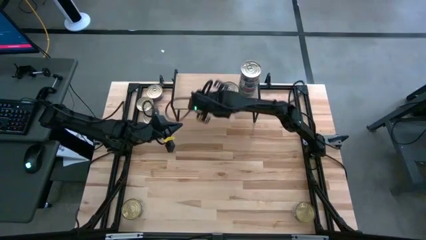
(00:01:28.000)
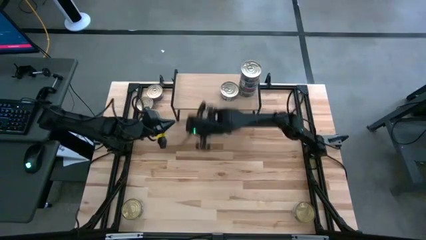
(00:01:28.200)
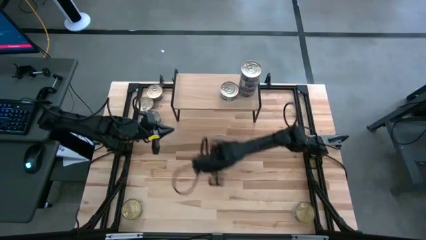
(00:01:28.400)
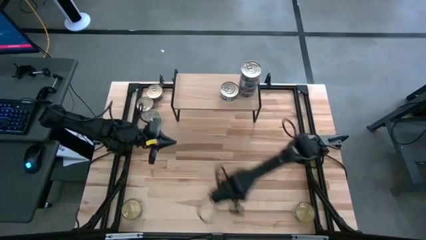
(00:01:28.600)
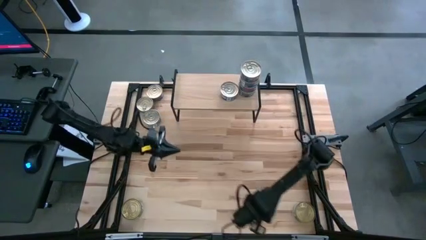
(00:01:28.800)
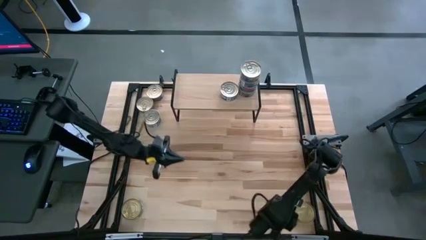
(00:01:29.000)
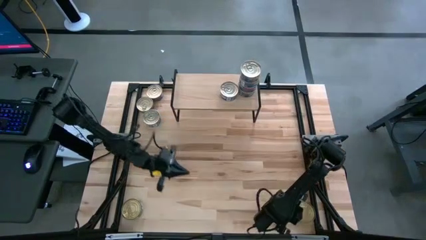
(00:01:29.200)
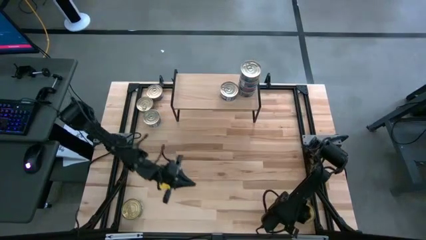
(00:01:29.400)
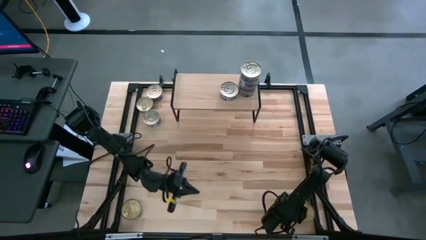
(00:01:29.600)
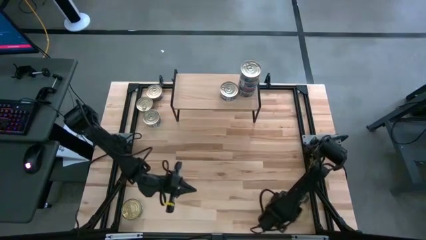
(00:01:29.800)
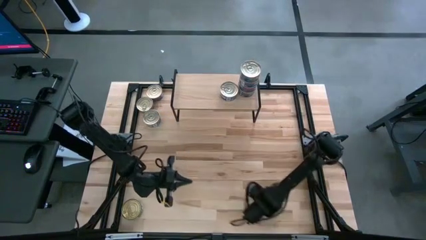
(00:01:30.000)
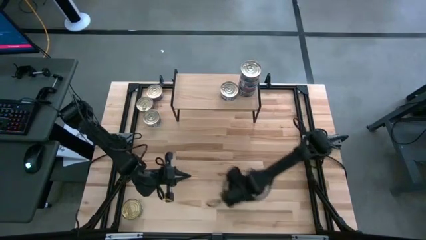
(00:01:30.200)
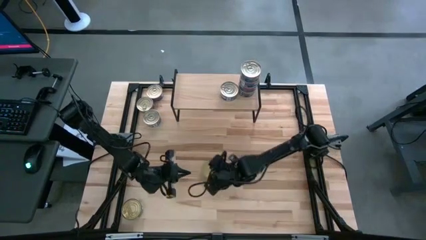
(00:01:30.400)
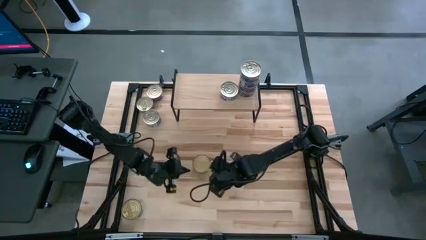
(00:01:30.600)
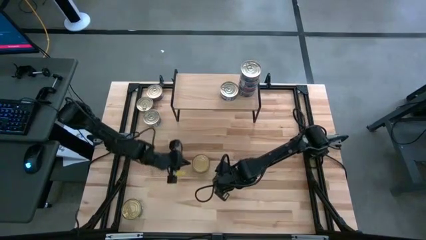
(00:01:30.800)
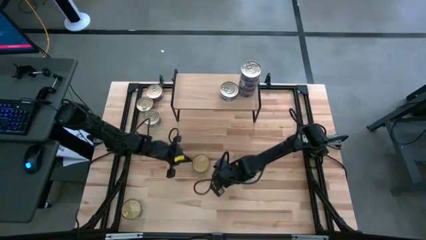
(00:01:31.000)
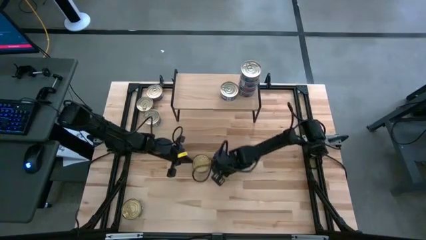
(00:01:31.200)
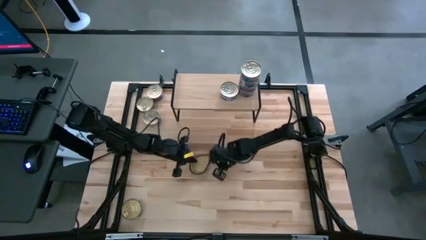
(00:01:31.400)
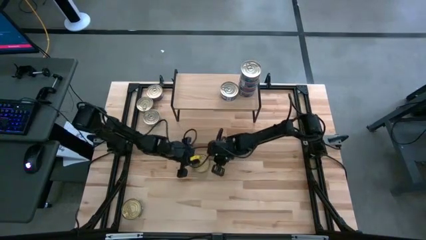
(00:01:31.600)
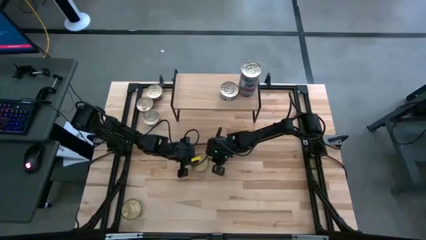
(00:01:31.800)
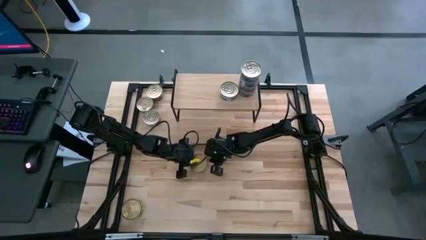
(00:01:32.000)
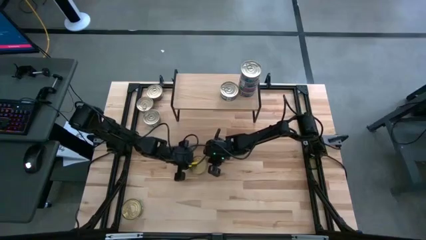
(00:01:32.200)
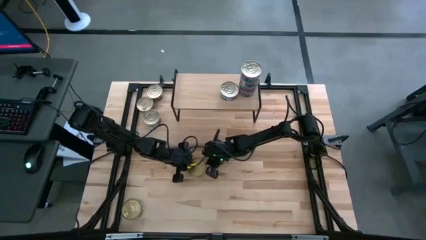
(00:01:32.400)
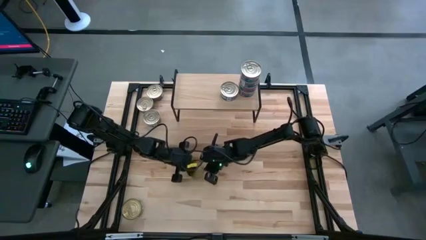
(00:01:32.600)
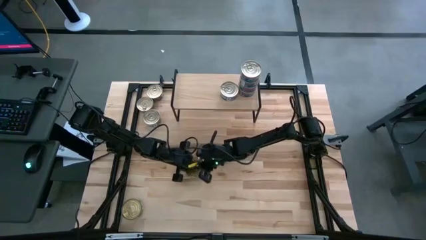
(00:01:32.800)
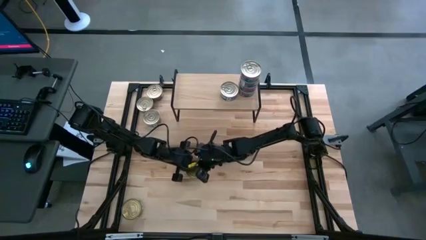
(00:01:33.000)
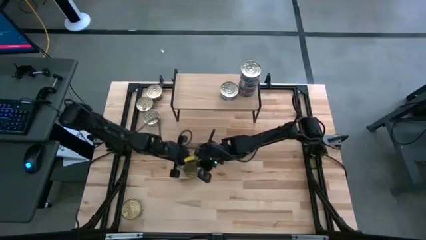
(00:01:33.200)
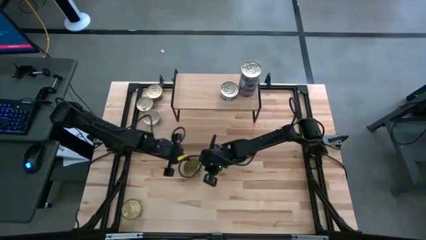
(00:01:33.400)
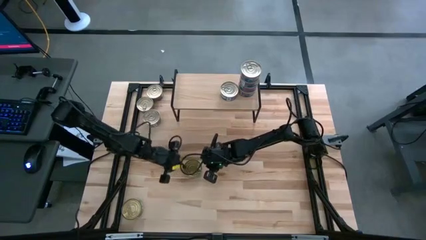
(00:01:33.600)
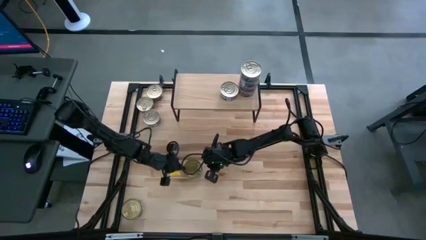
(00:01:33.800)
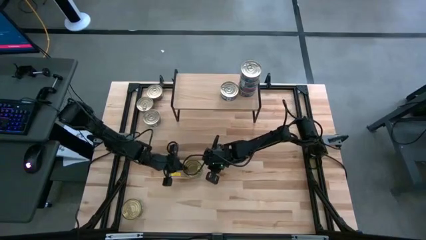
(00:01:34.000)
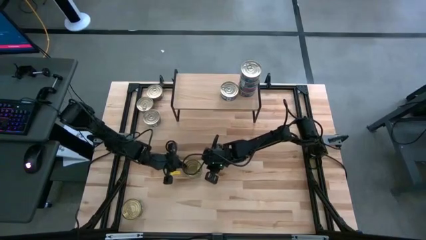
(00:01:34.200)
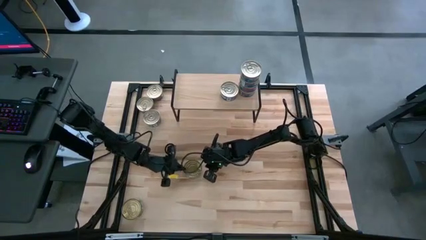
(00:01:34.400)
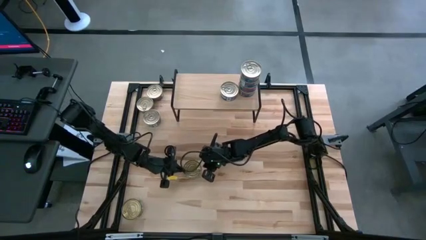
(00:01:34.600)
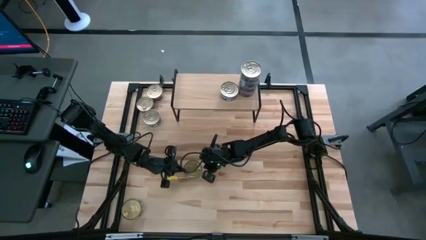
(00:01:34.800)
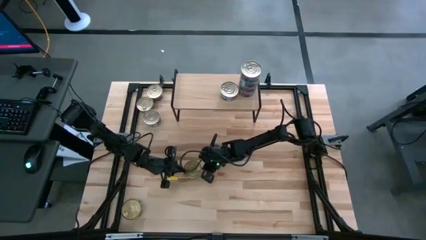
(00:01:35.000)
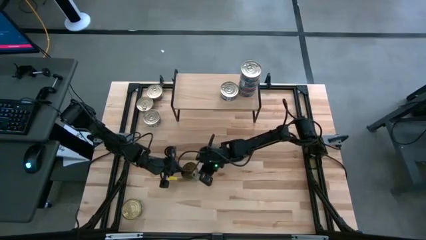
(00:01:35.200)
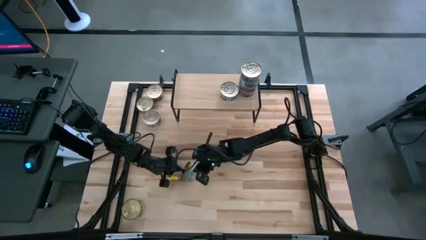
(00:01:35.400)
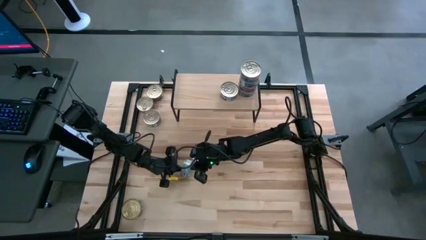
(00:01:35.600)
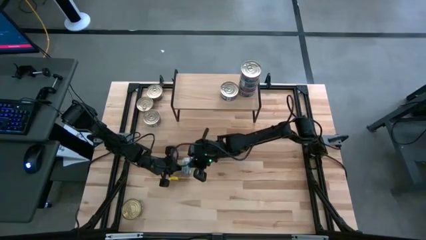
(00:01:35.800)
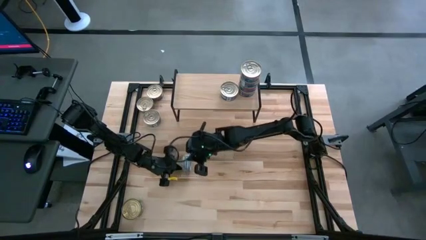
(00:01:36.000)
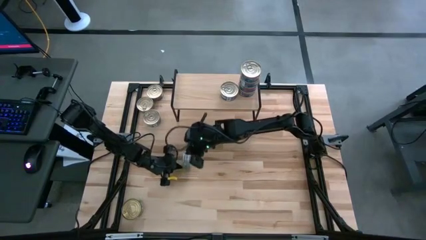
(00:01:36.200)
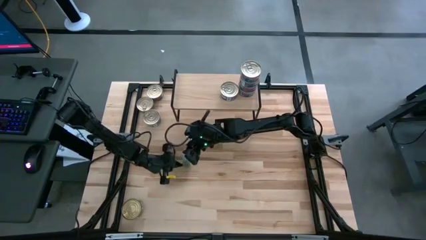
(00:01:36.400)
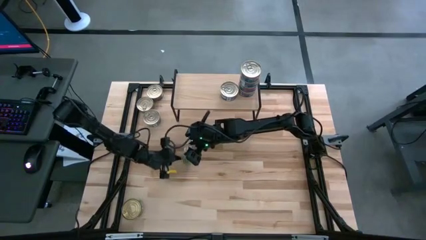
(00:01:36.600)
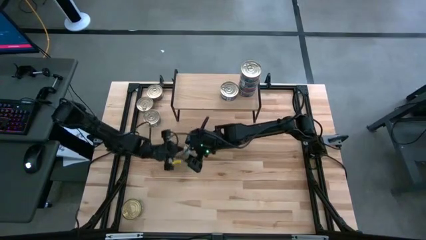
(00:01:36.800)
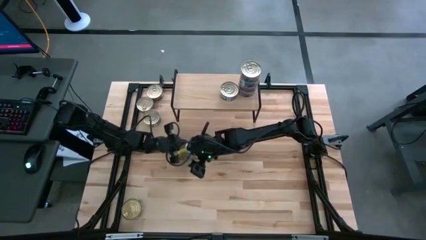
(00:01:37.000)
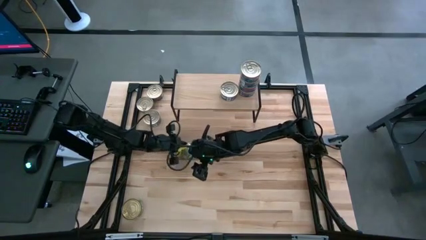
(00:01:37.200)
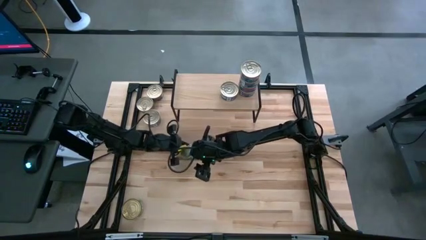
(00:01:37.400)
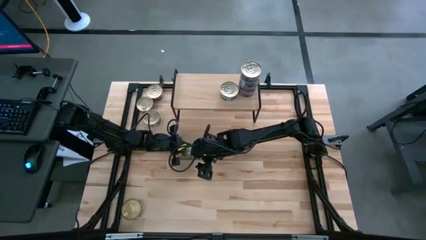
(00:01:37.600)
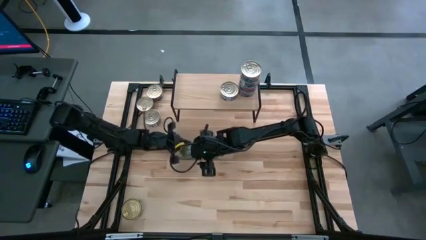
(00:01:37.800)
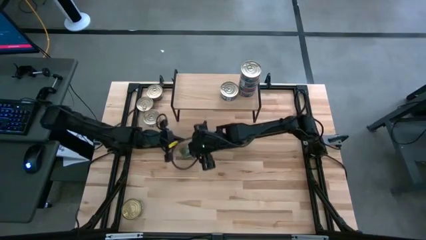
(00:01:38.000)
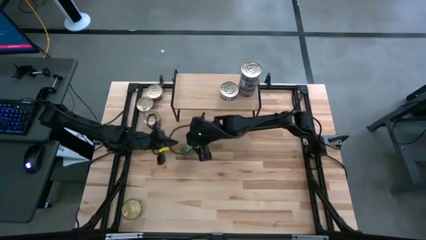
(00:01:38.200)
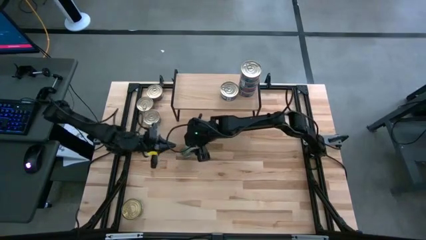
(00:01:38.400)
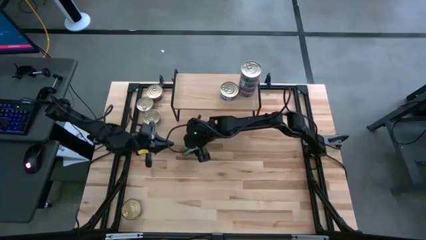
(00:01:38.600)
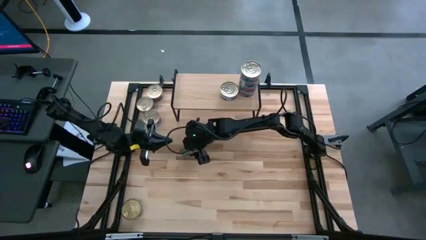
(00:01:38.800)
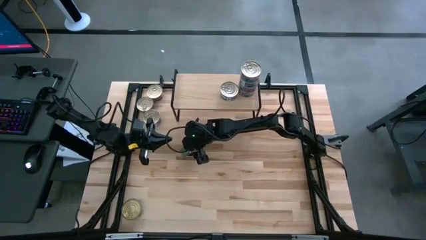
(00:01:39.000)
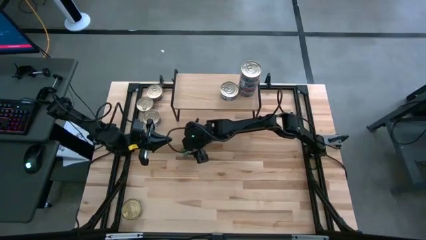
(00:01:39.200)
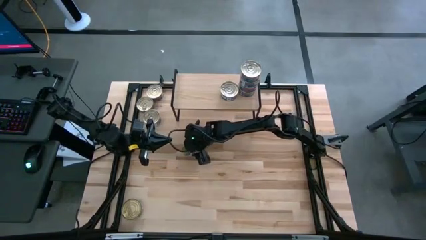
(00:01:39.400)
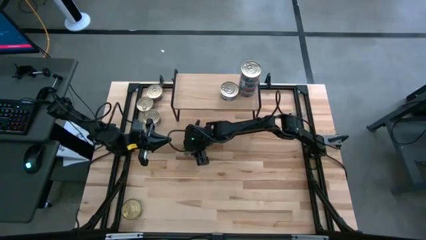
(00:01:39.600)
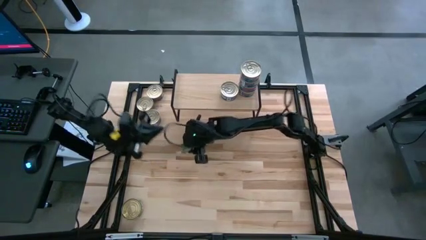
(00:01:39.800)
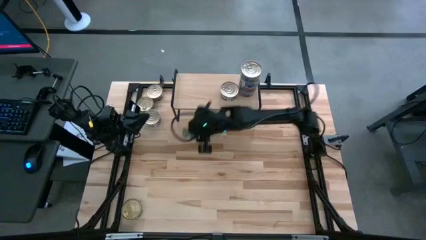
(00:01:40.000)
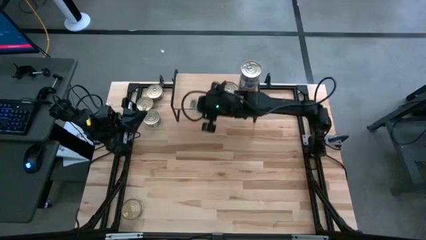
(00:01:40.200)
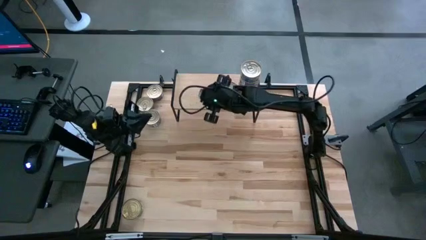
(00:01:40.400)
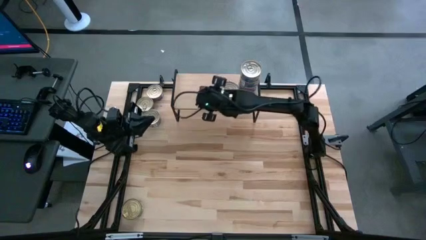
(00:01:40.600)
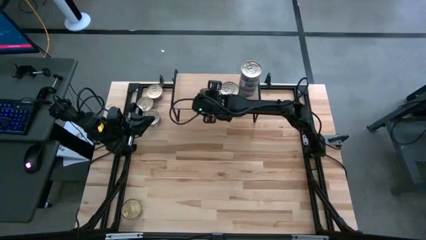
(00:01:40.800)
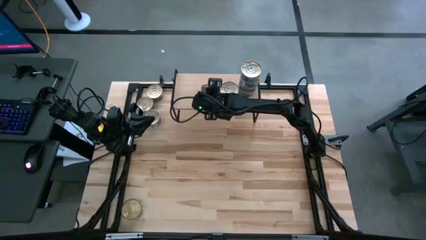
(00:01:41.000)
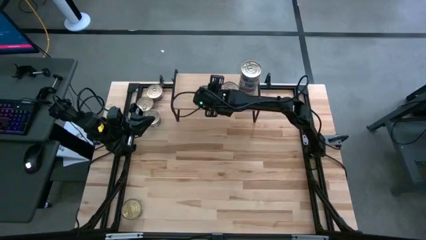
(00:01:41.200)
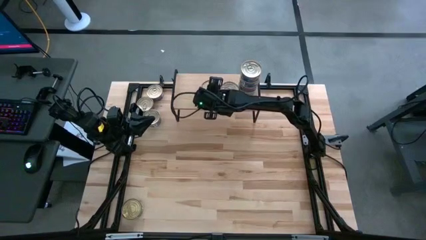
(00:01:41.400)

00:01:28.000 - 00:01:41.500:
Task: Stack canned seafood by type on shelf
Put the green tuna can on the shelf
